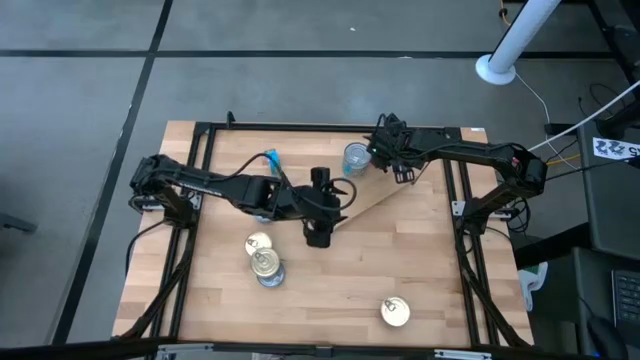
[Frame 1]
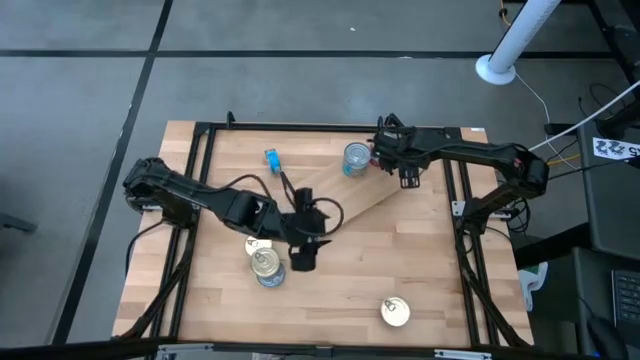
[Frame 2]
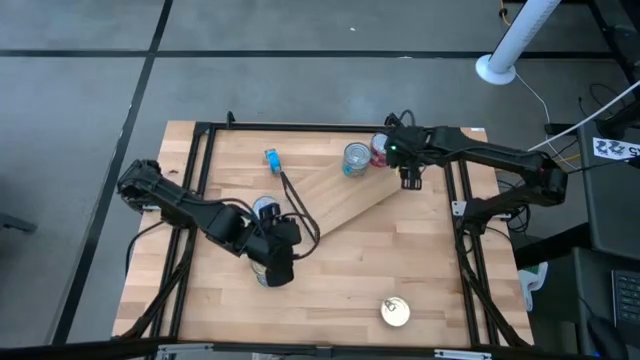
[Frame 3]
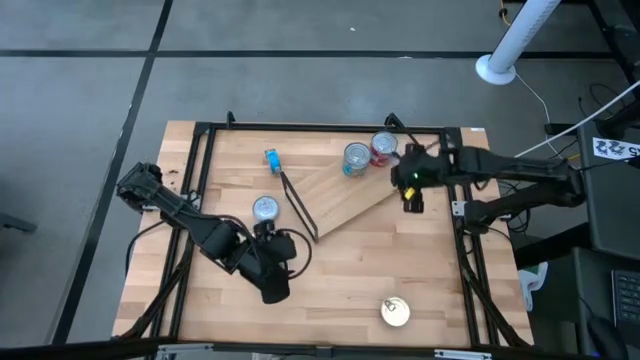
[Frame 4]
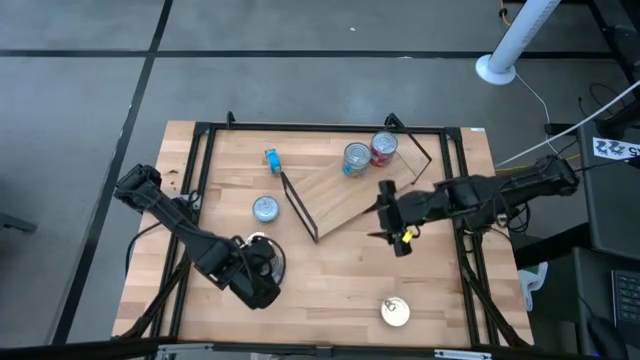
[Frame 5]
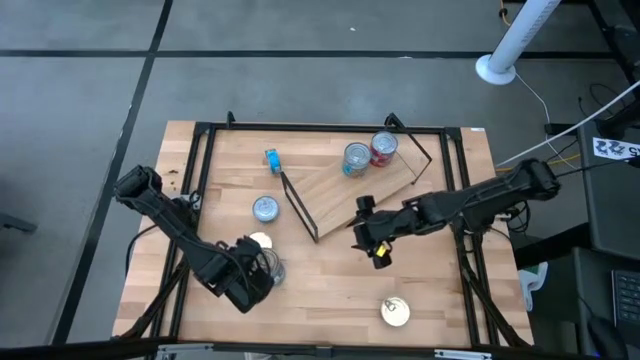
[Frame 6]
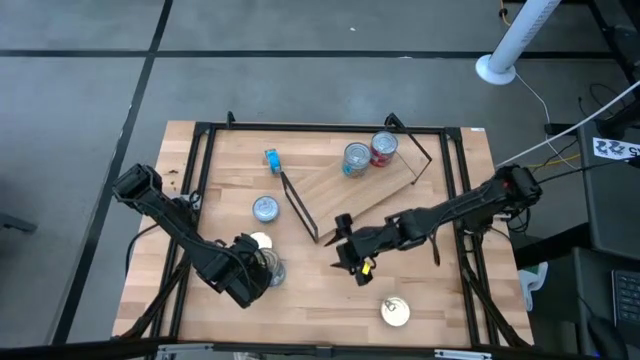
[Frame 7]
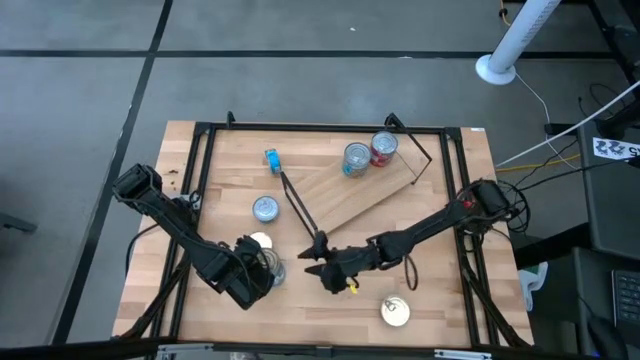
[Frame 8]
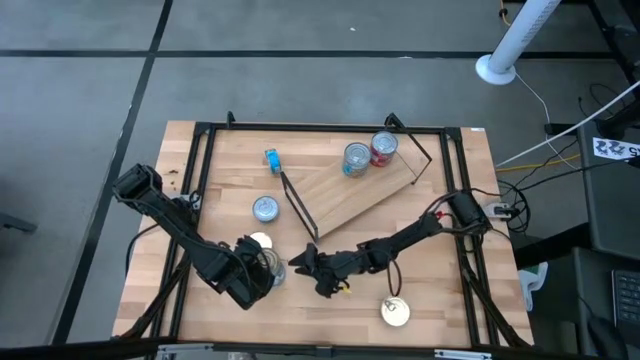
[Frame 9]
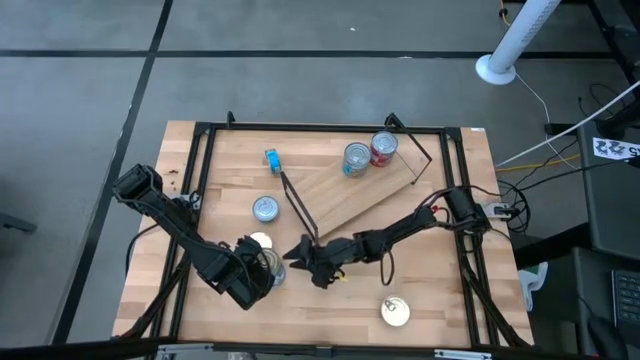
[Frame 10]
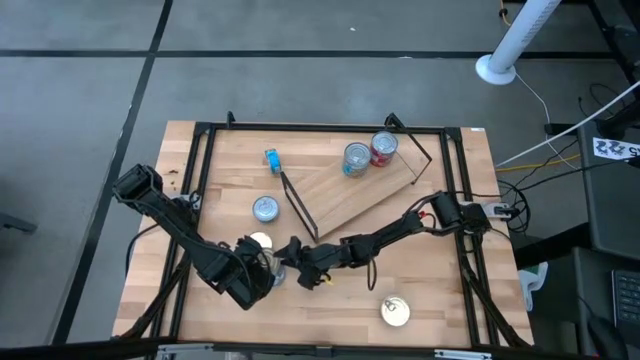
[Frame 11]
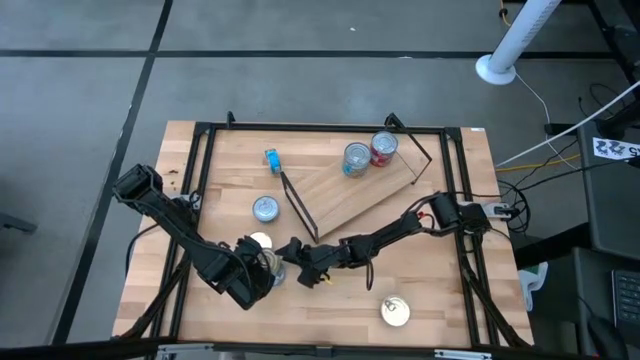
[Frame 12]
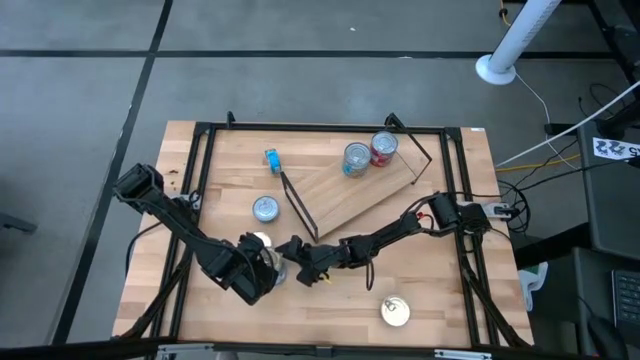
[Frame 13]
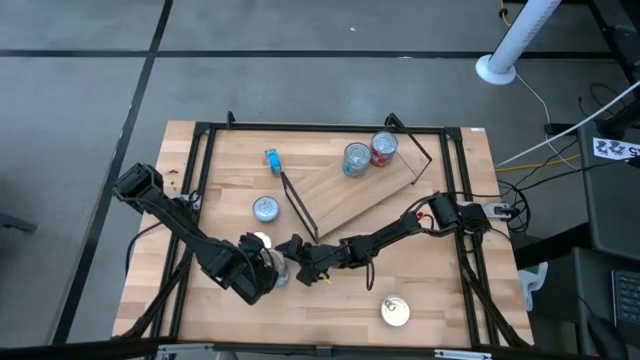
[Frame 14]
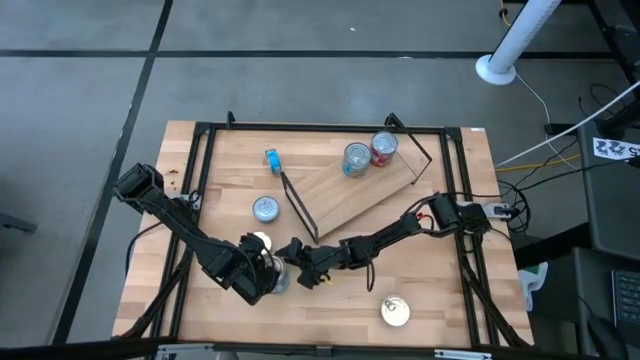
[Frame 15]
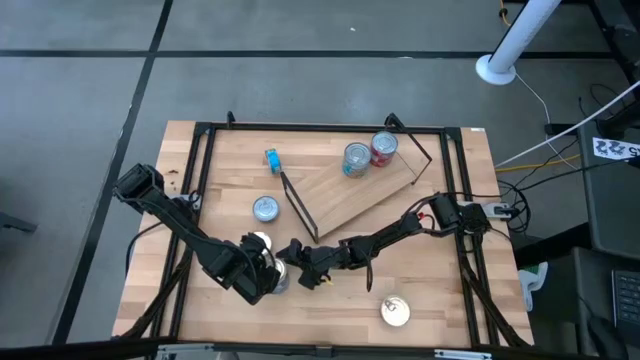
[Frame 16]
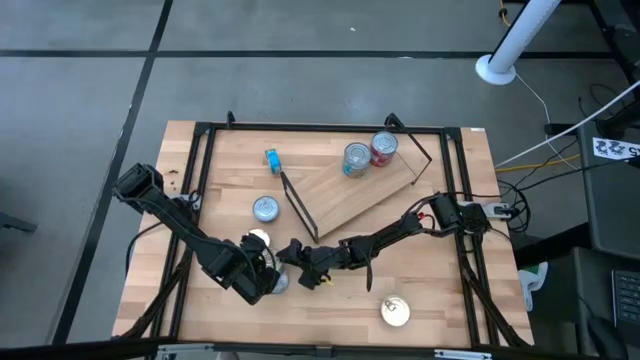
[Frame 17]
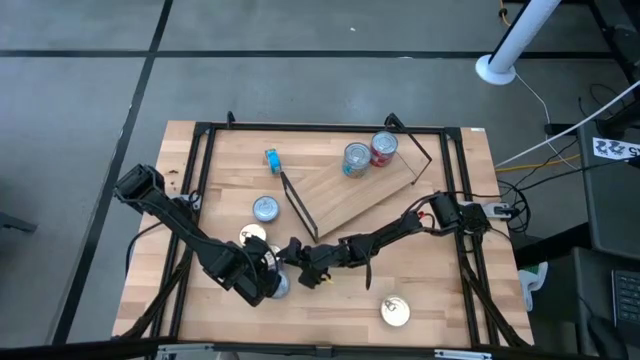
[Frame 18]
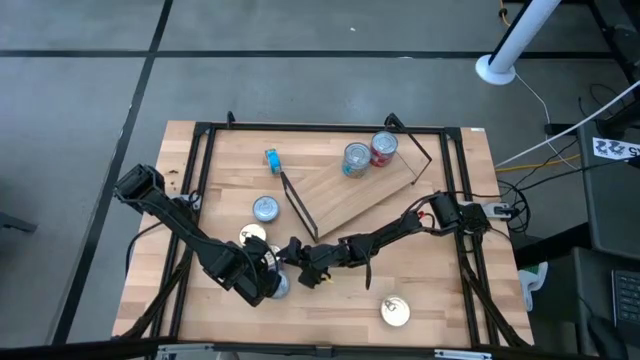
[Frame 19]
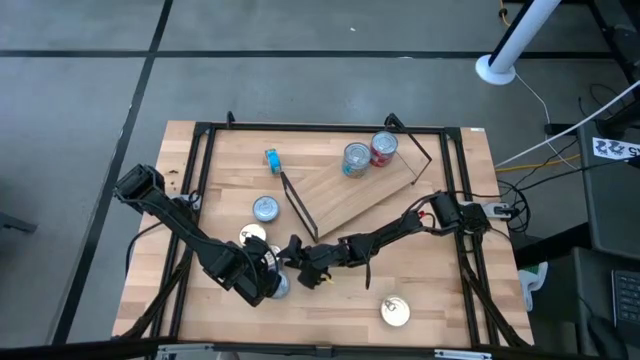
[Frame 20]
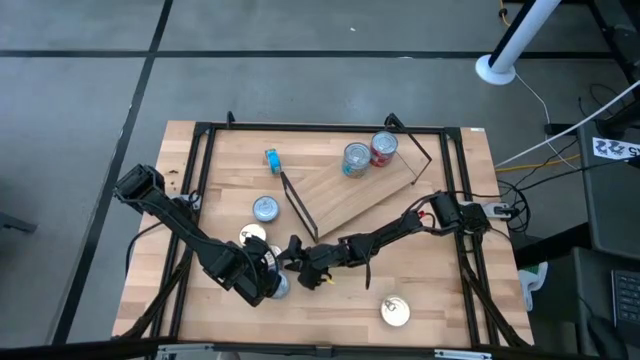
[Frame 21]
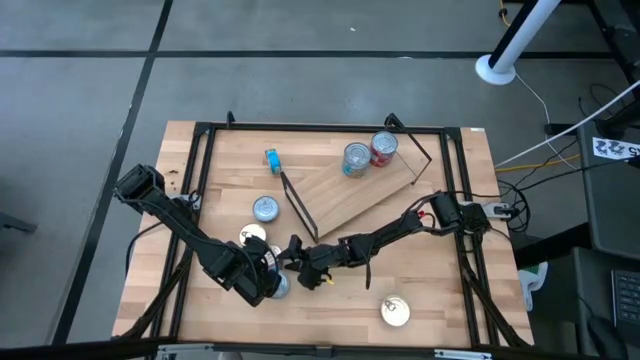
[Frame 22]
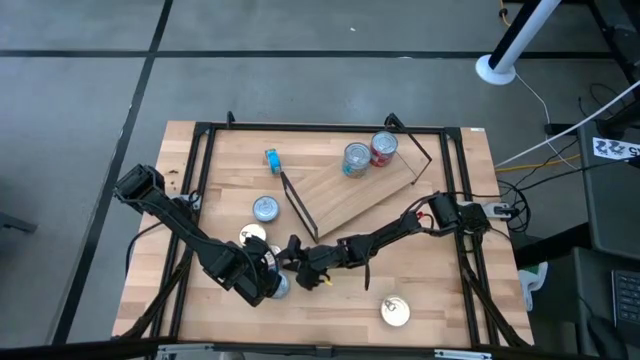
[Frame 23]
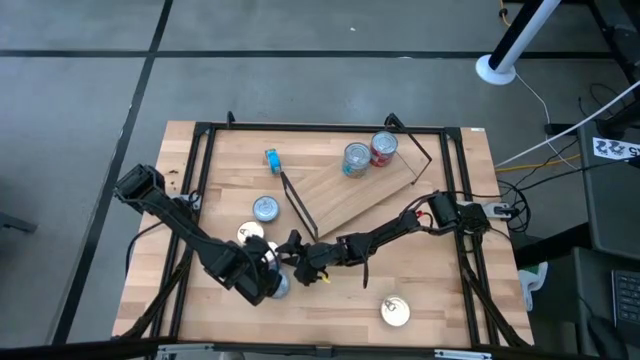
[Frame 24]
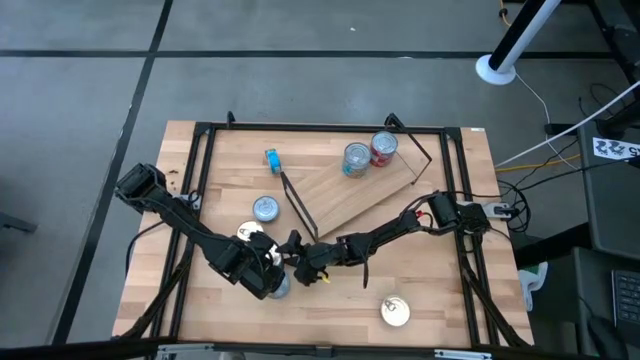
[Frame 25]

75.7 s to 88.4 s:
Task: Stack canned seafood by type on shelf
Put the middle blue tuna can on the shelf

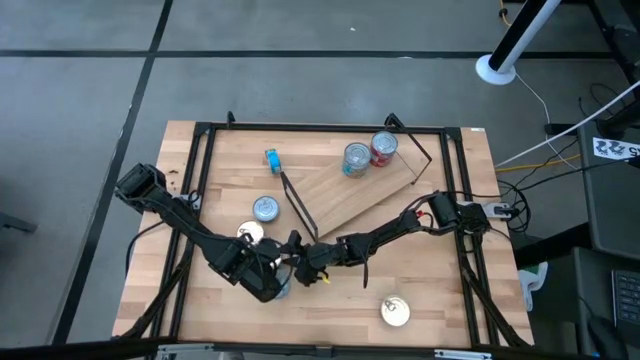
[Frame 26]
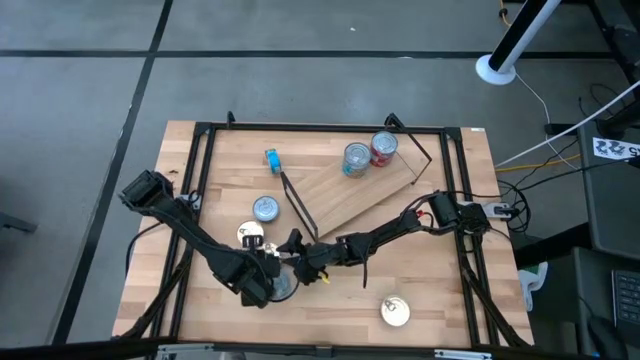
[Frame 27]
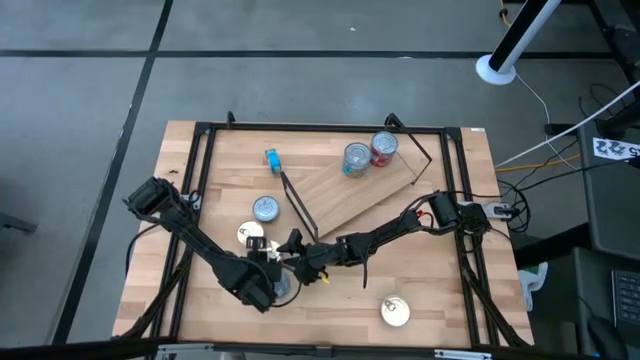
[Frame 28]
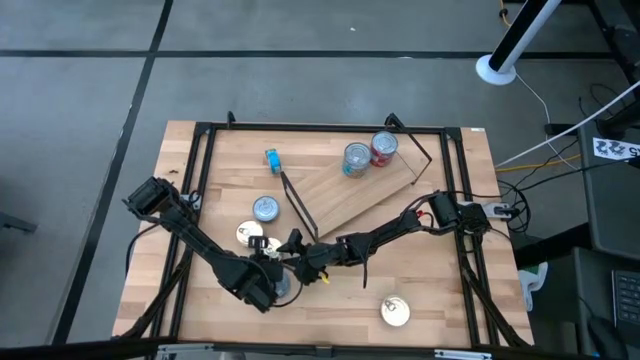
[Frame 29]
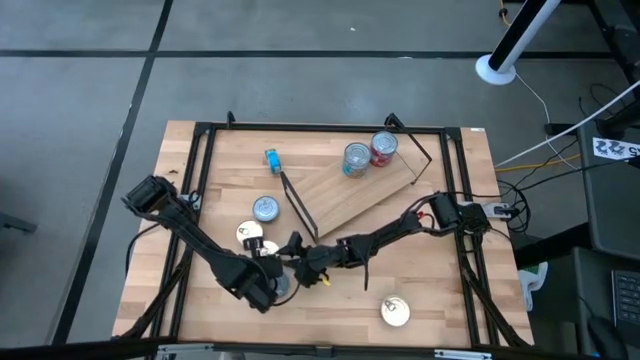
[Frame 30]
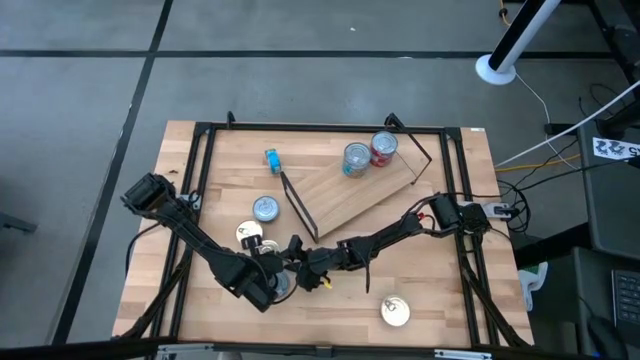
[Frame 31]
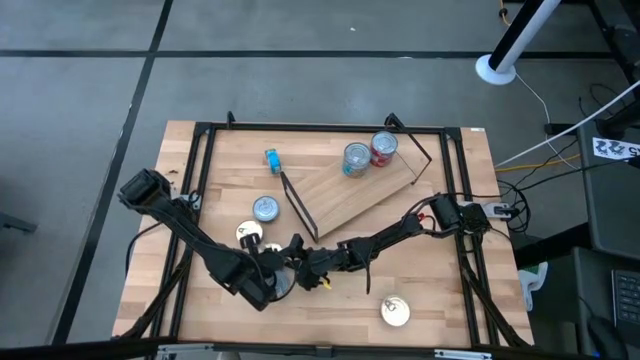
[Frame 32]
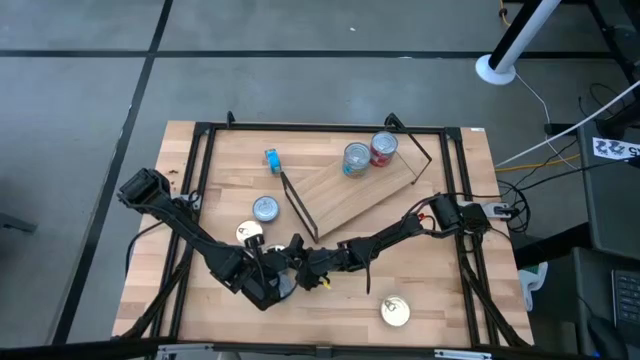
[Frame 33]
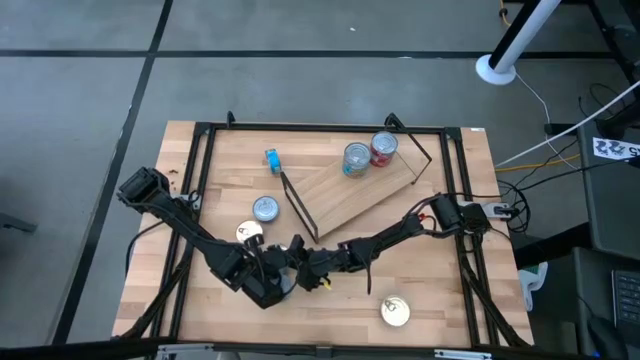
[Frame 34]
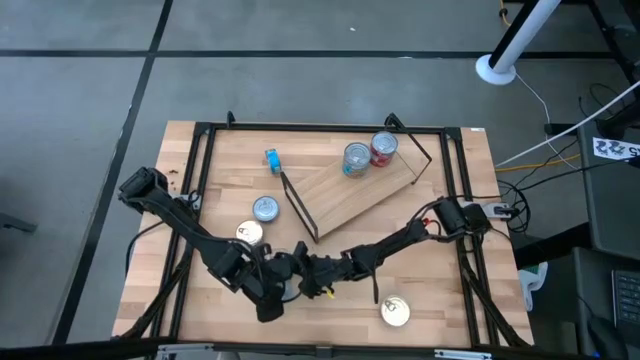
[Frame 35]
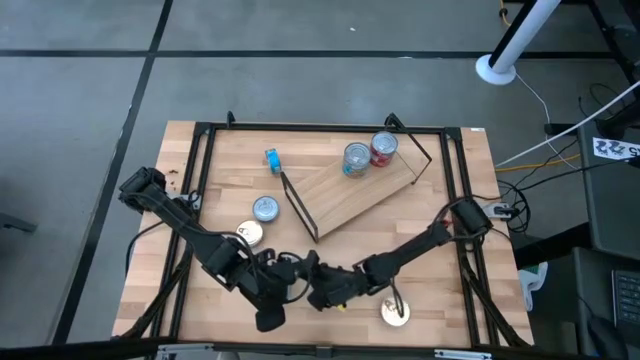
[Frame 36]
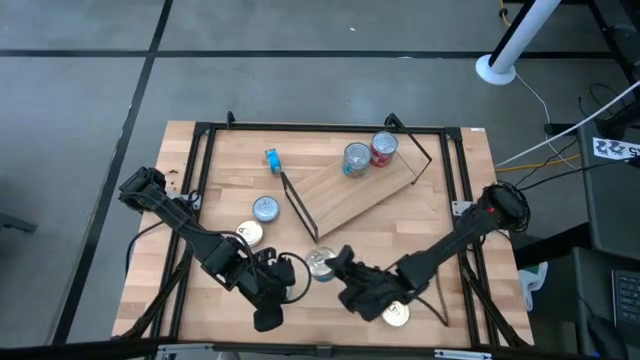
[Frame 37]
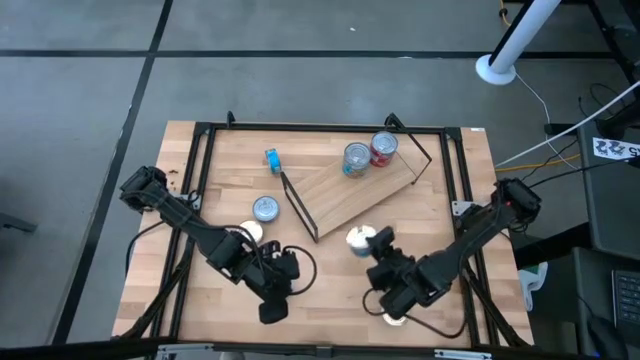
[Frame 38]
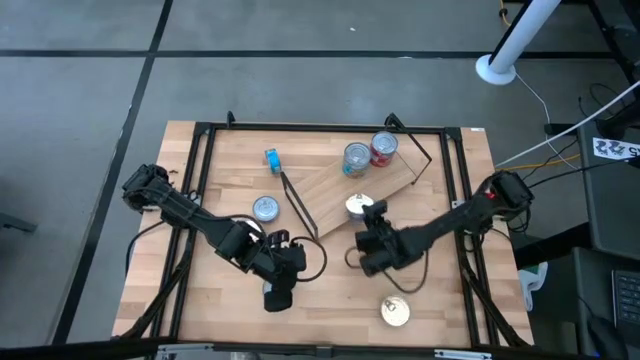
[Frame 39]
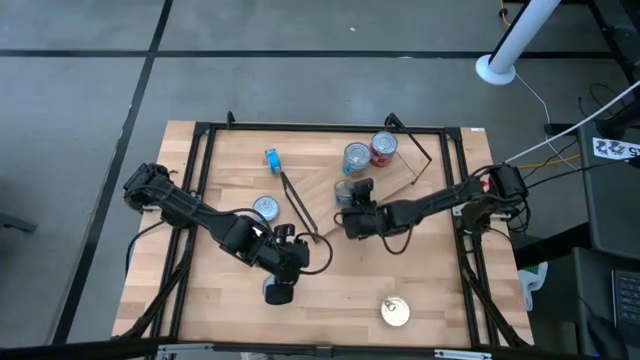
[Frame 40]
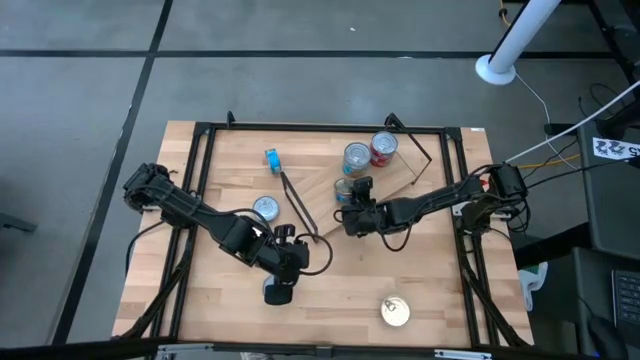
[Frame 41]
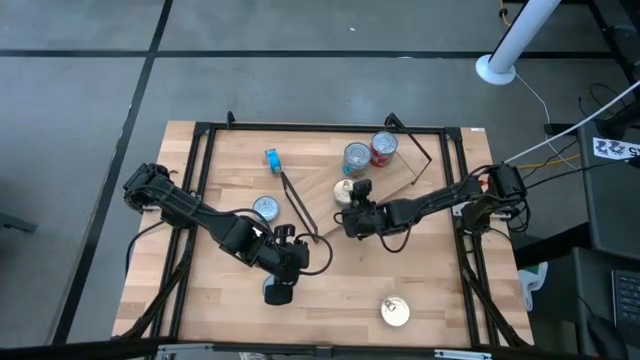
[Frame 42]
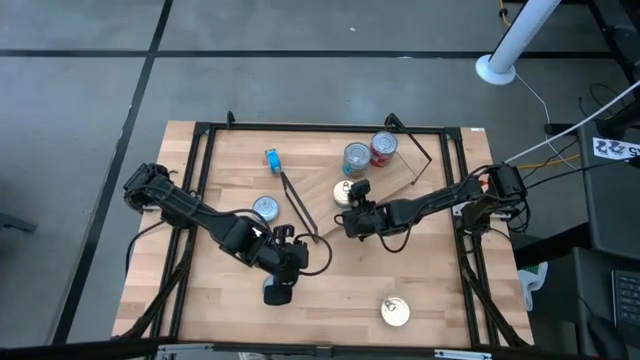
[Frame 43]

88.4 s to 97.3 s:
Put the middle blue tuna can on the shelf
